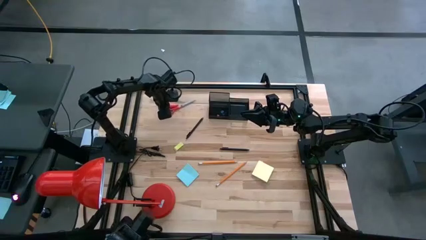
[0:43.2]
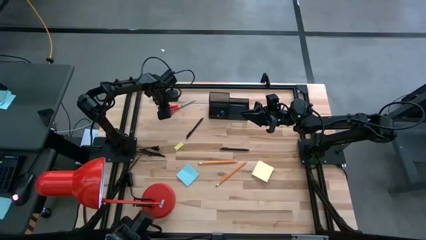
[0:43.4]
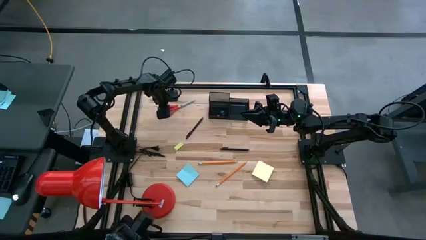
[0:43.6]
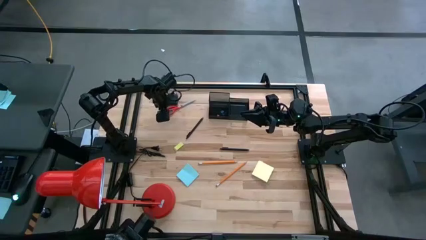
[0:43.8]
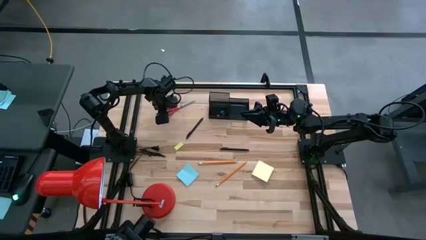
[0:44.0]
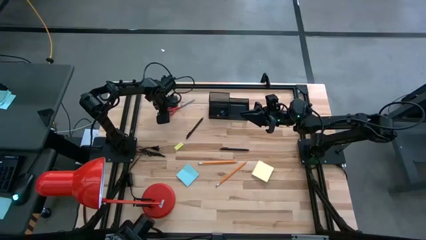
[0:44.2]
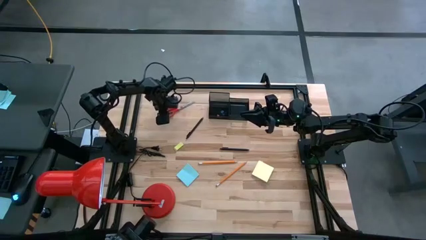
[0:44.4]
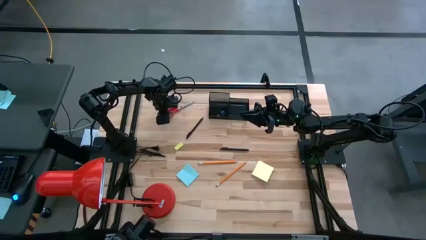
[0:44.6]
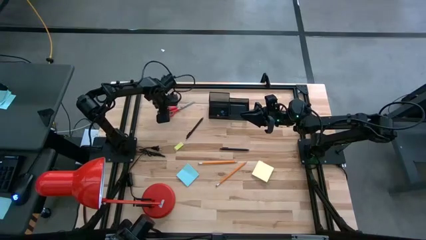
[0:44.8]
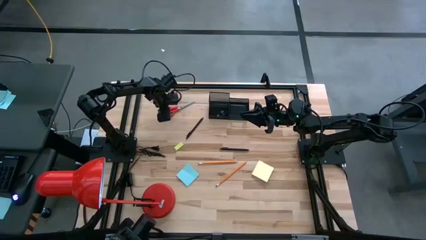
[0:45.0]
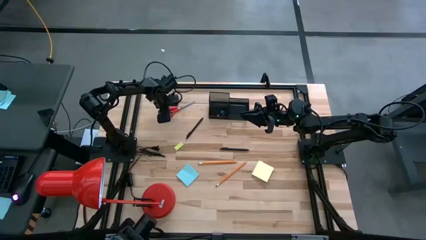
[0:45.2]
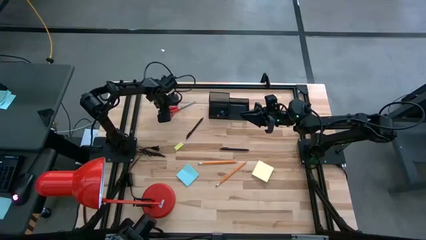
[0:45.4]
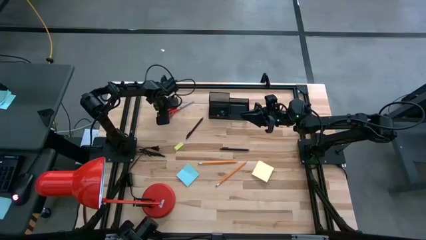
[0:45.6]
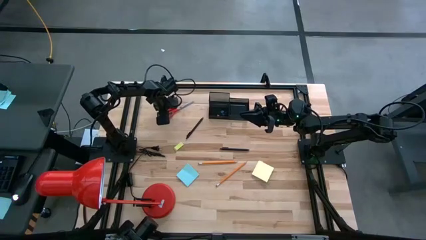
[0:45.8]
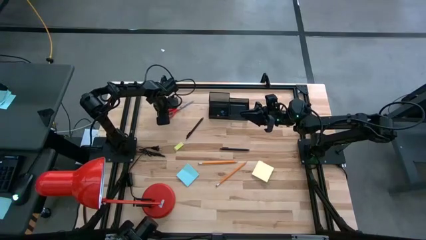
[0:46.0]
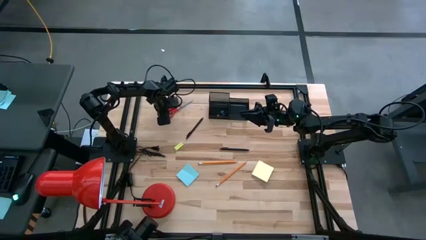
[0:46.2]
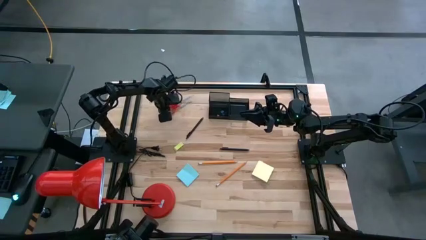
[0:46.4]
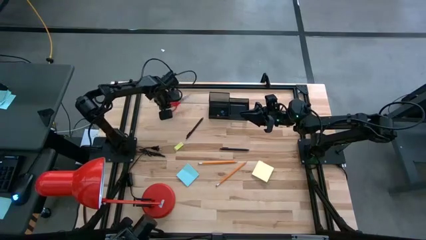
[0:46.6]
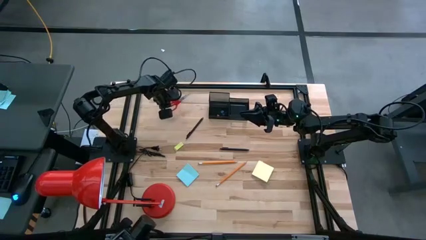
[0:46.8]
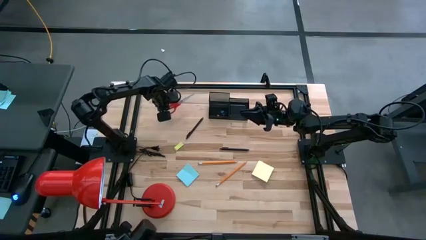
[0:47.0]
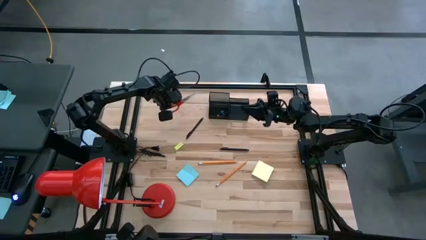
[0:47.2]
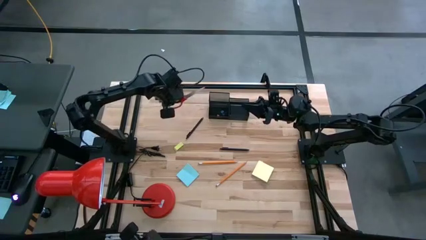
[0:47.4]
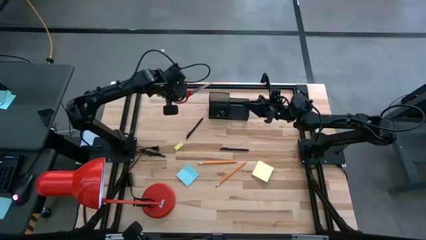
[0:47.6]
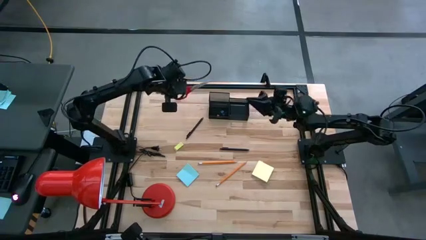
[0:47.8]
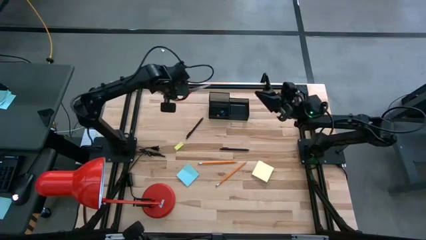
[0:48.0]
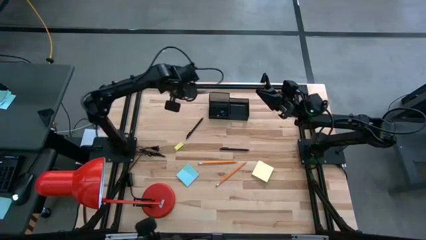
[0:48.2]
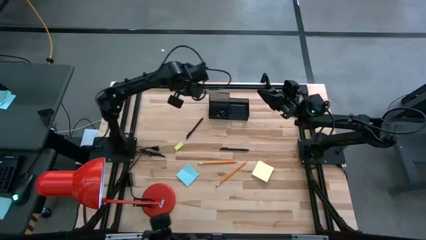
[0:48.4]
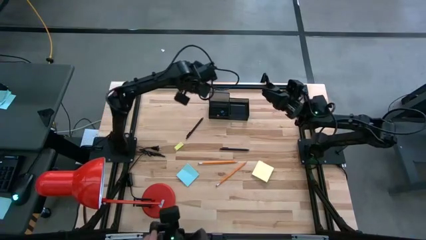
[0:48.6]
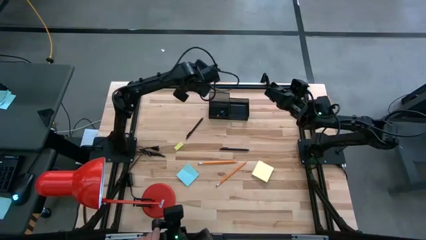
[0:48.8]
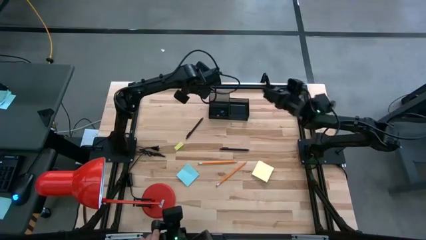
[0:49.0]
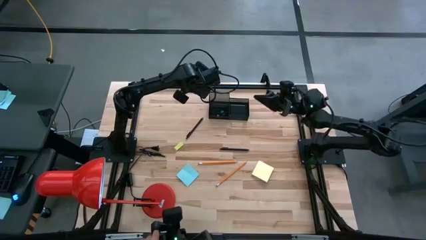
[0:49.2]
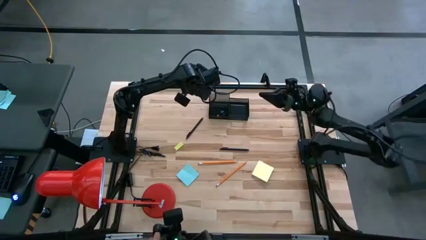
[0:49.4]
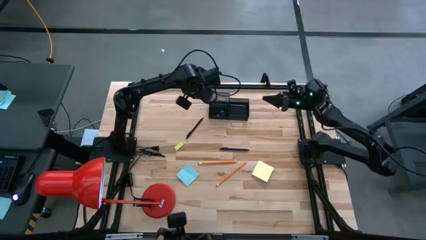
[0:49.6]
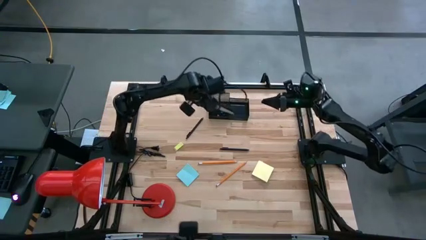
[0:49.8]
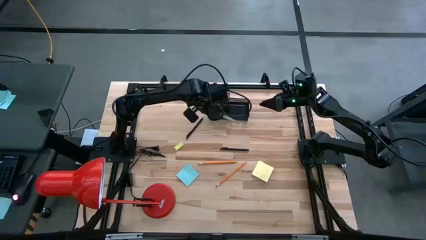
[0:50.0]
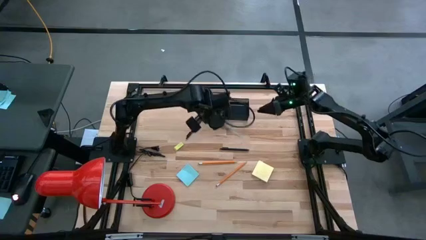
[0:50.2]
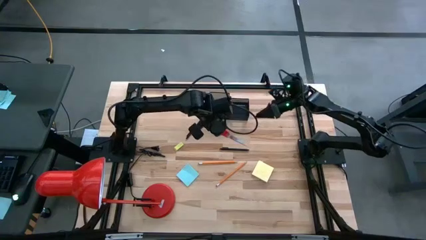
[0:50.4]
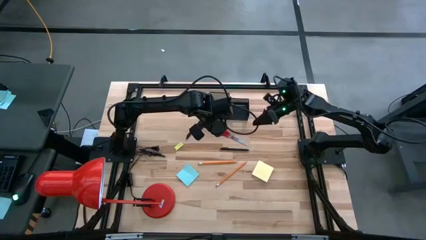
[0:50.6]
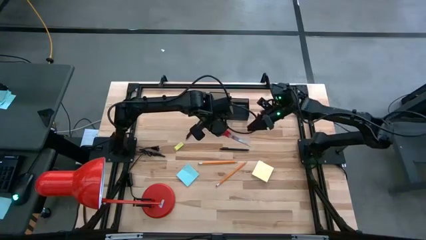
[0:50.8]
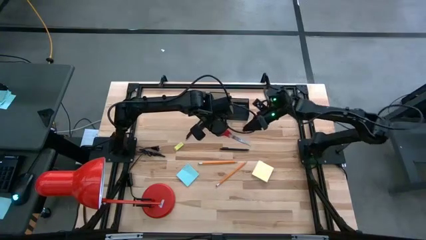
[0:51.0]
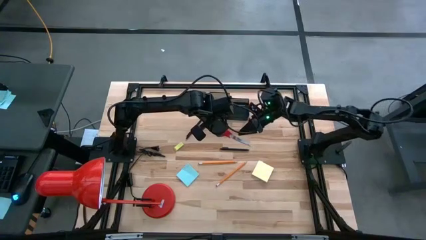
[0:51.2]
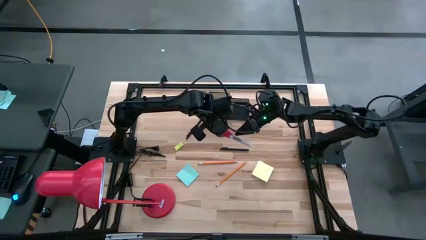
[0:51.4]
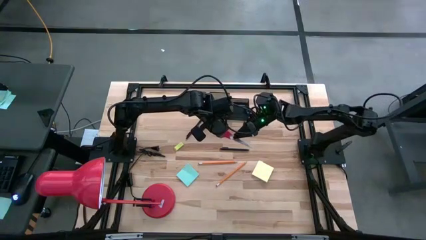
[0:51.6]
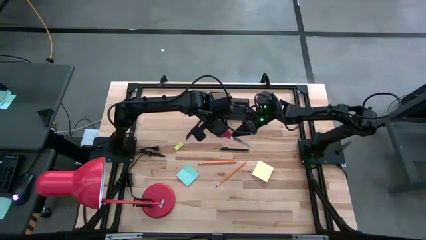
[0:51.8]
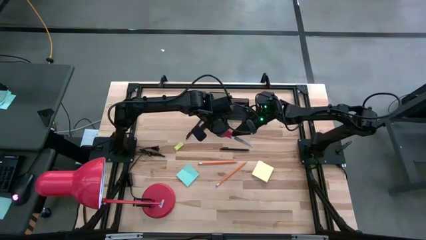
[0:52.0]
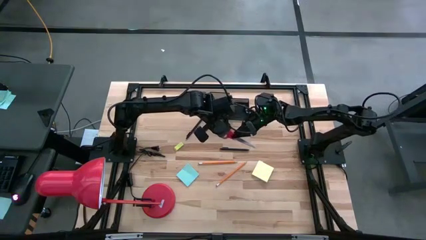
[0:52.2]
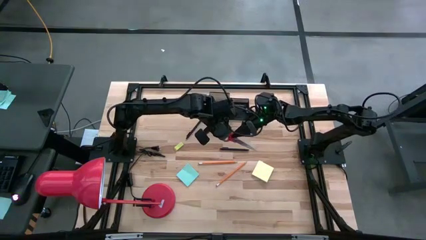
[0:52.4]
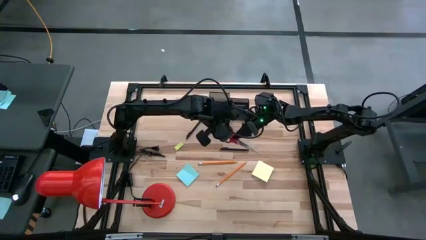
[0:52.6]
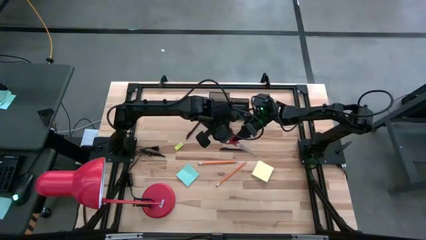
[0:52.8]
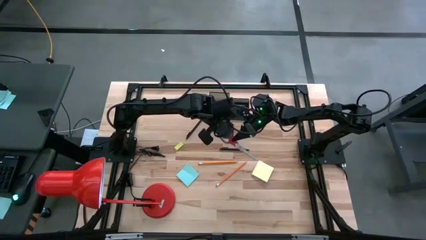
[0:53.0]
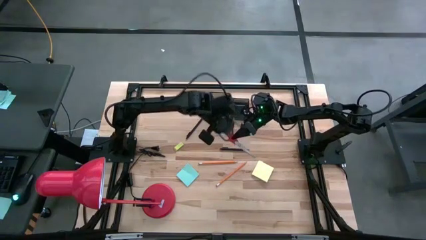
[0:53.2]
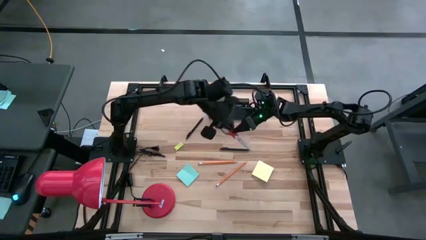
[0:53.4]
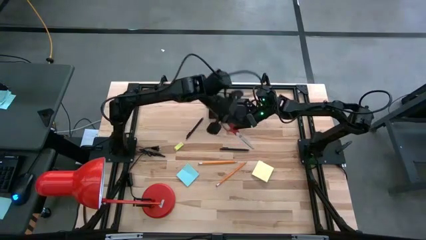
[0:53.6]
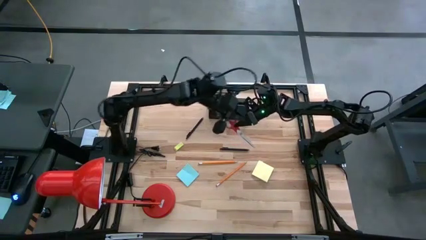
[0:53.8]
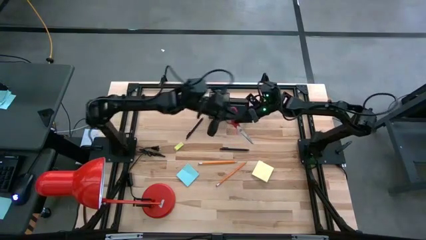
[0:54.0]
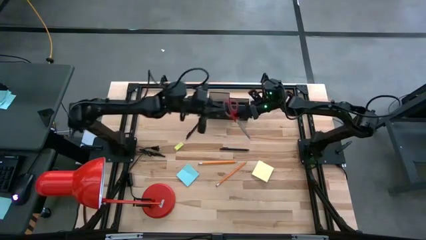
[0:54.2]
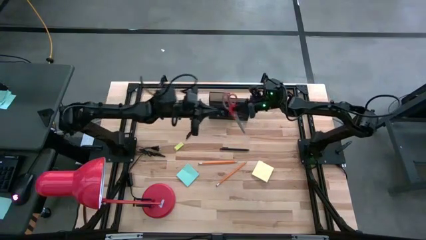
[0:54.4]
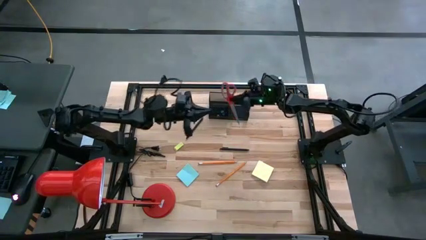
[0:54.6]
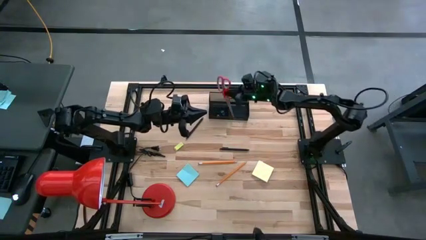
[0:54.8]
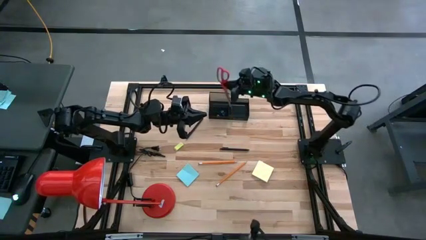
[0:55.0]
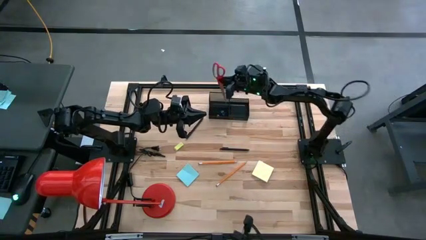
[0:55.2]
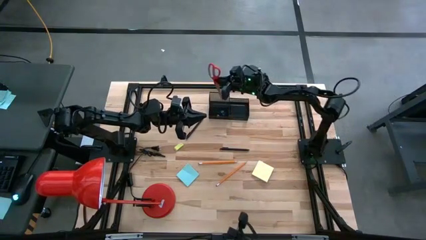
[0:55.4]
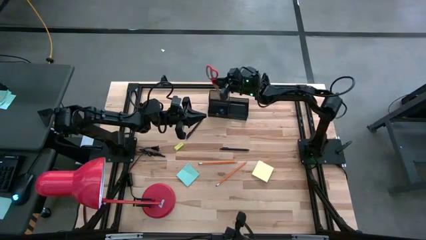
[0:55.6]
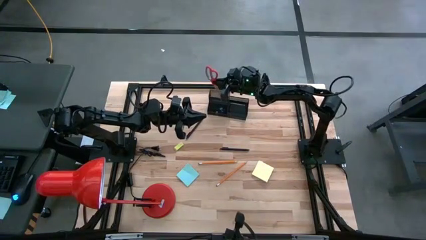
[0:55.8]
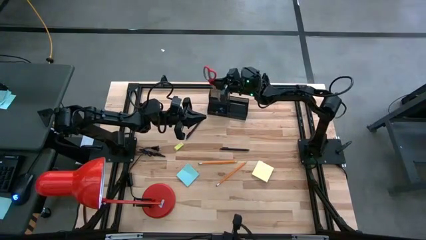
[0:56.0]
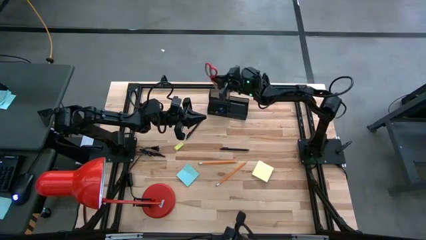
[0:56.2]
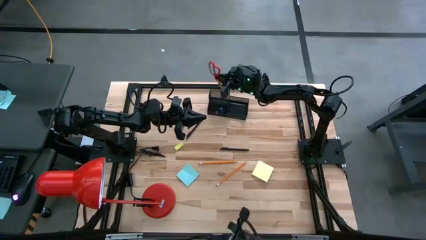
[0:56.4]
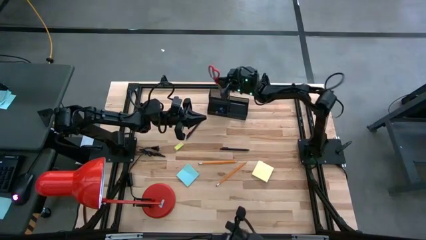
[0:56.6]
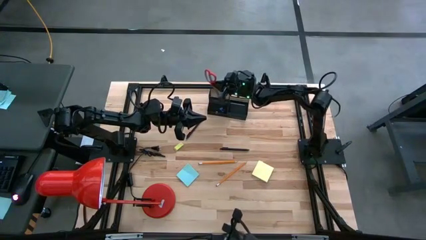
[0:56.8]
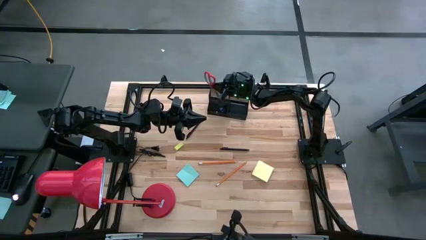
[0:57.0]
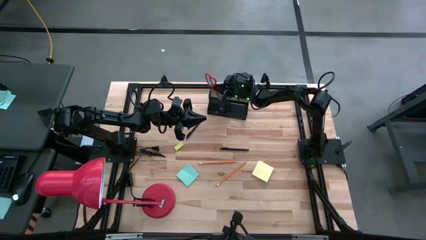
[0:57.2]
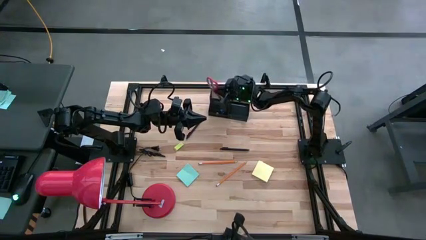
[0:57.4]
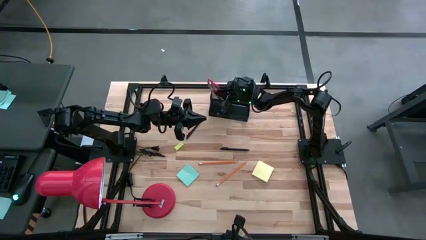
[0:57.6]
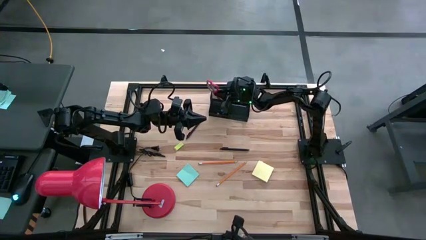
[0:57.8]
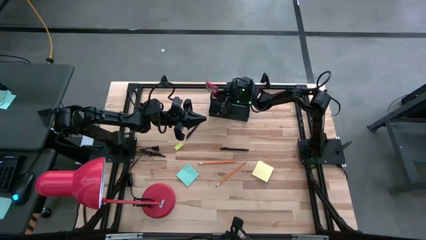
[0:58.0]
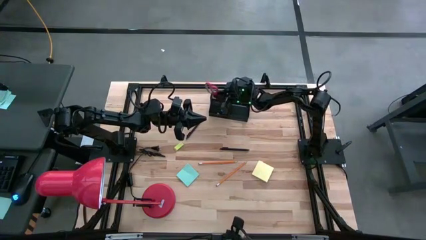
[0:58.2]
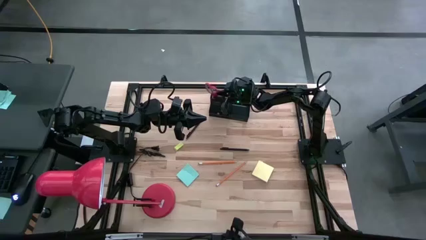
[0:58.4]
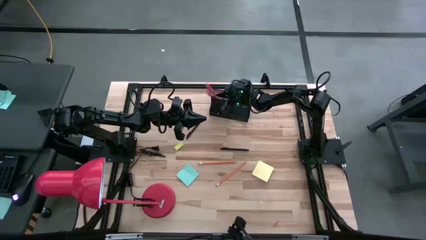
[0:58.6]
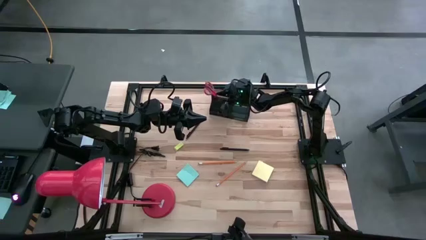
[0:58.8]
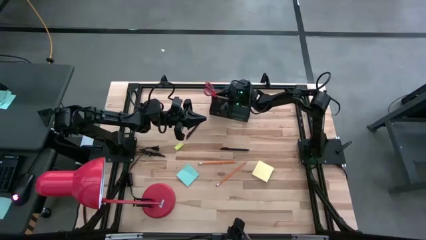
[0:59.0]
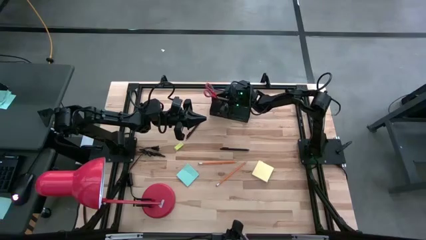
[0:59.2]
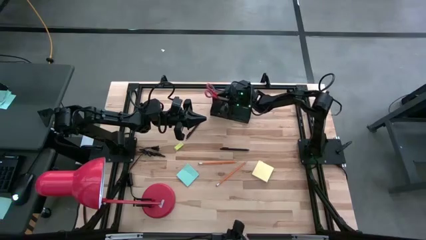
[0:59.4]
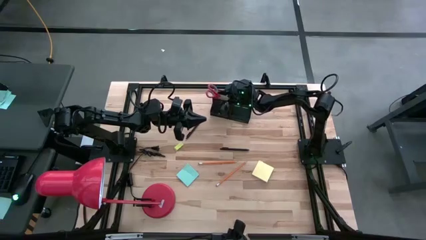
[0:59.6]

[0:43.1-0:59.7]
Task: Pick and place office supplies into organizer
Put the orange scissors in the black desk organizer
